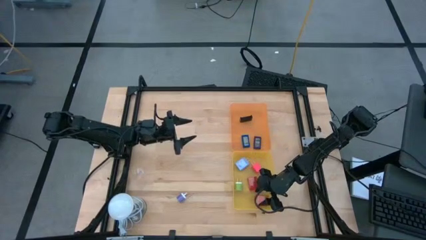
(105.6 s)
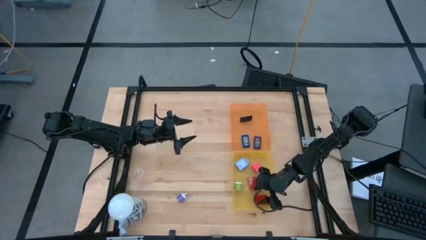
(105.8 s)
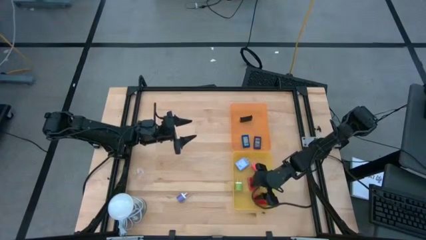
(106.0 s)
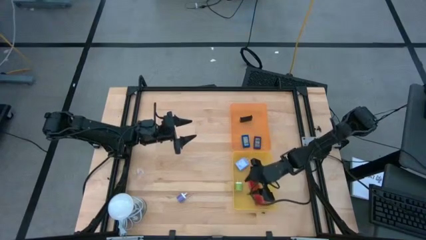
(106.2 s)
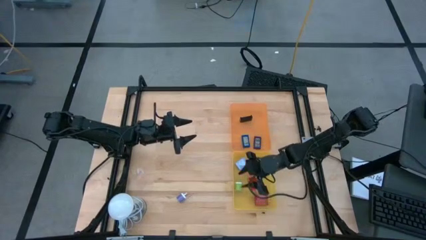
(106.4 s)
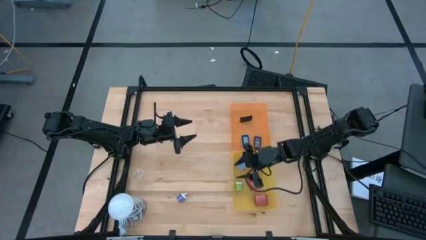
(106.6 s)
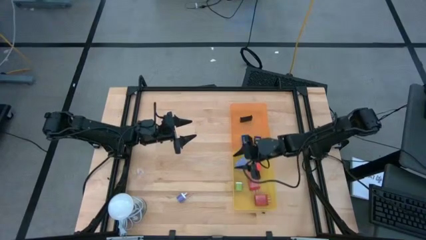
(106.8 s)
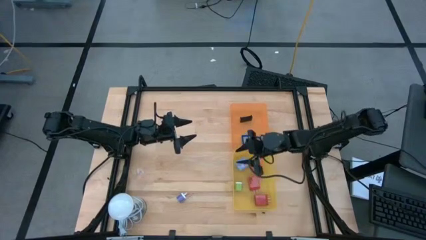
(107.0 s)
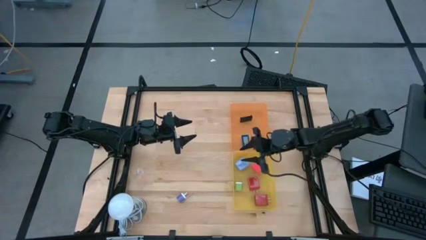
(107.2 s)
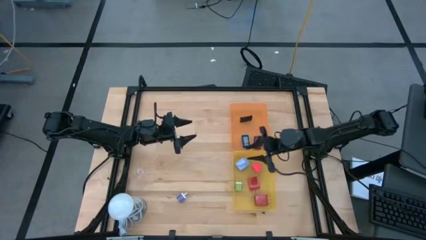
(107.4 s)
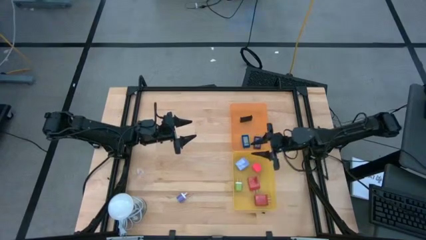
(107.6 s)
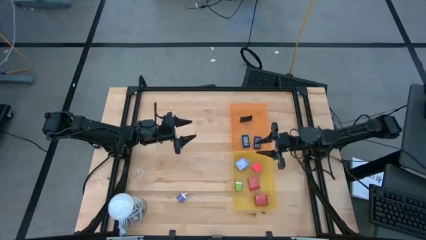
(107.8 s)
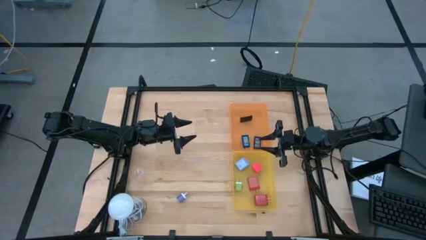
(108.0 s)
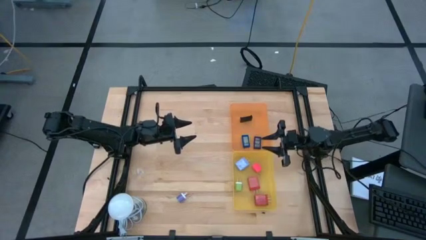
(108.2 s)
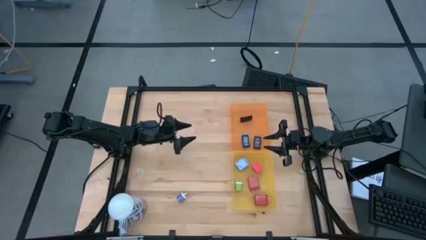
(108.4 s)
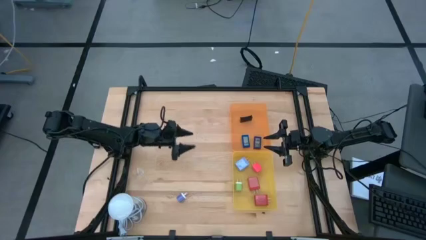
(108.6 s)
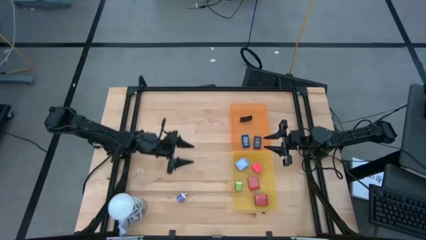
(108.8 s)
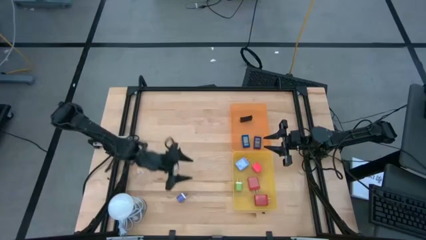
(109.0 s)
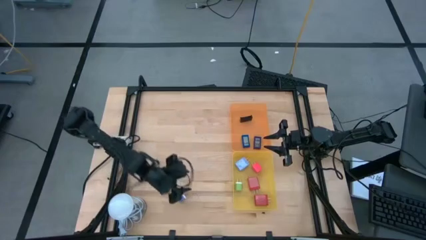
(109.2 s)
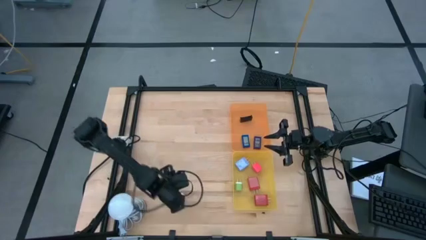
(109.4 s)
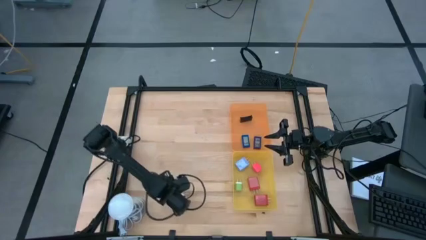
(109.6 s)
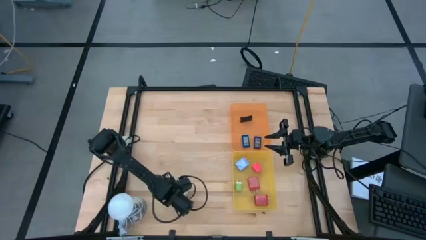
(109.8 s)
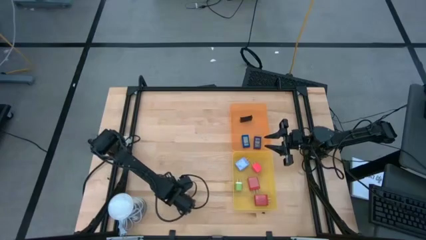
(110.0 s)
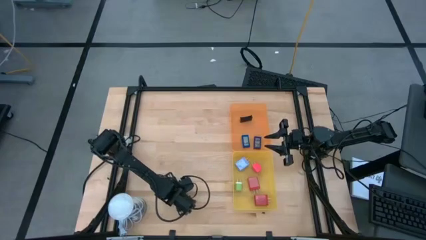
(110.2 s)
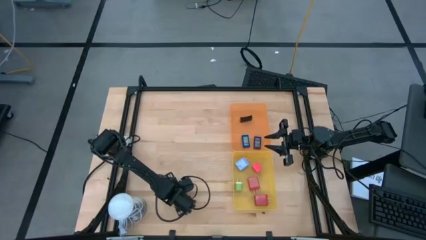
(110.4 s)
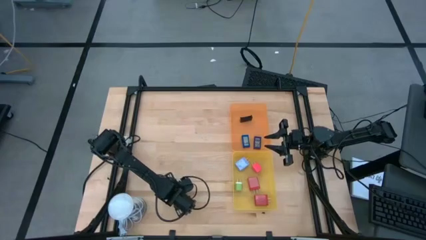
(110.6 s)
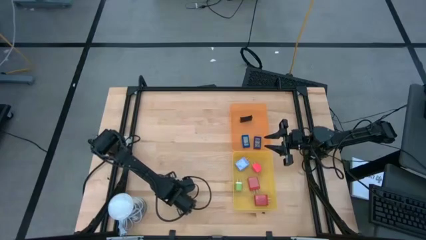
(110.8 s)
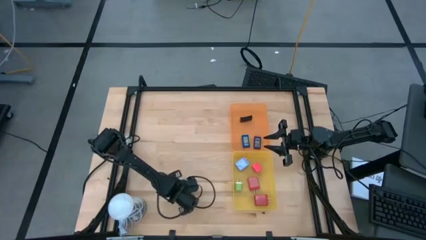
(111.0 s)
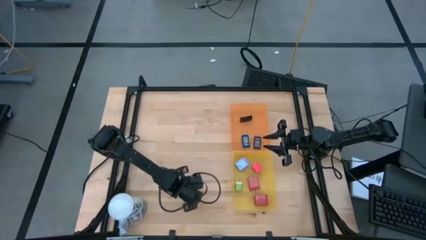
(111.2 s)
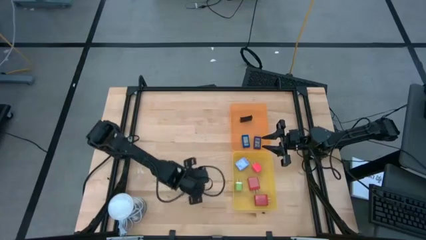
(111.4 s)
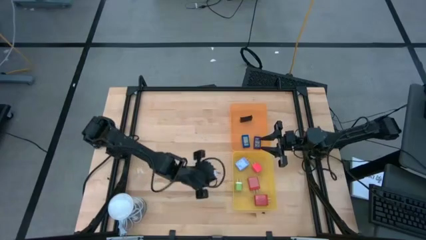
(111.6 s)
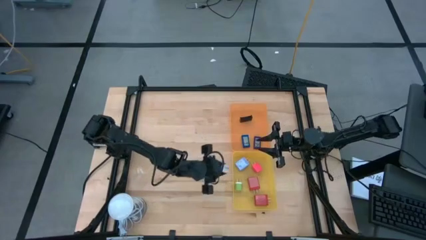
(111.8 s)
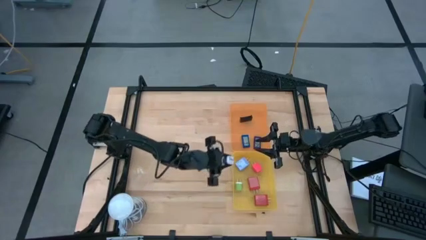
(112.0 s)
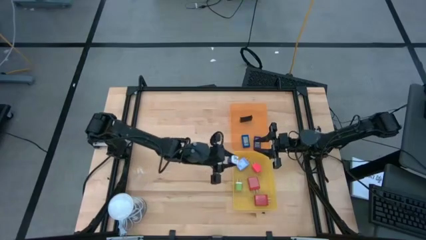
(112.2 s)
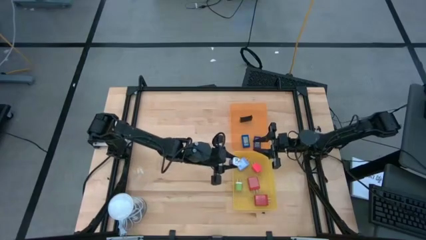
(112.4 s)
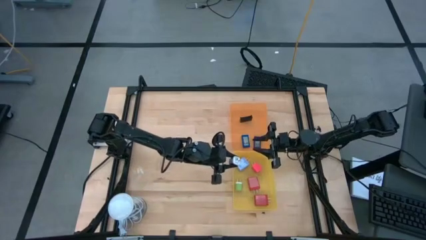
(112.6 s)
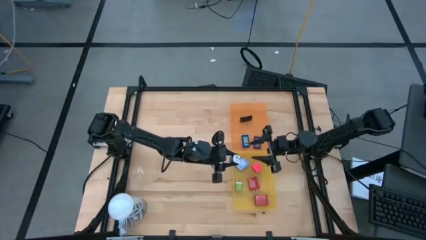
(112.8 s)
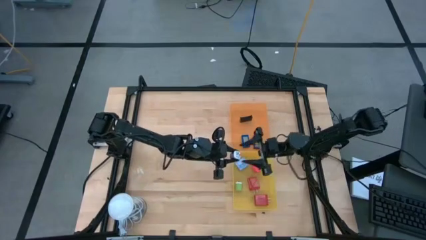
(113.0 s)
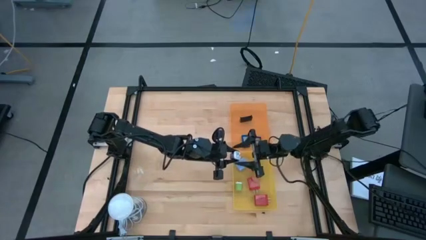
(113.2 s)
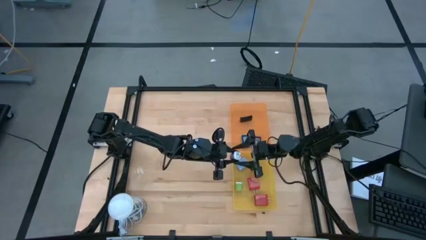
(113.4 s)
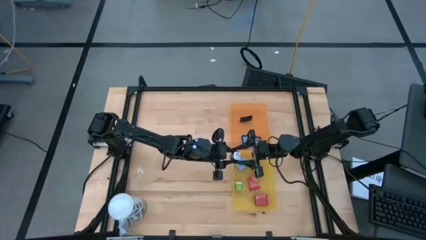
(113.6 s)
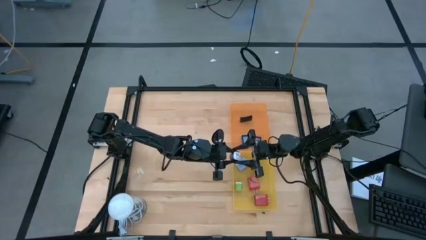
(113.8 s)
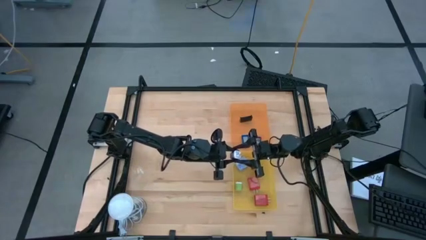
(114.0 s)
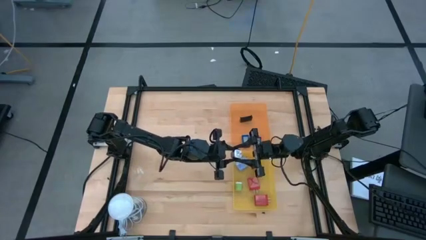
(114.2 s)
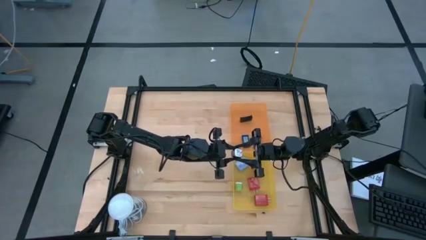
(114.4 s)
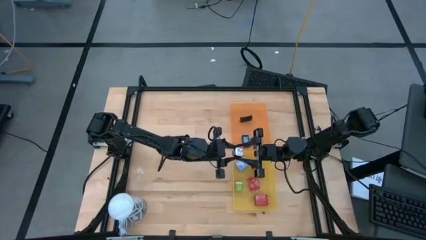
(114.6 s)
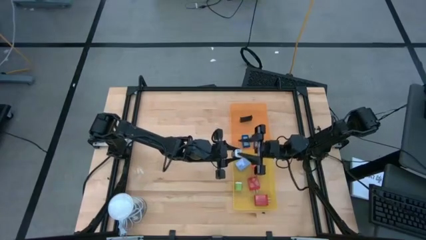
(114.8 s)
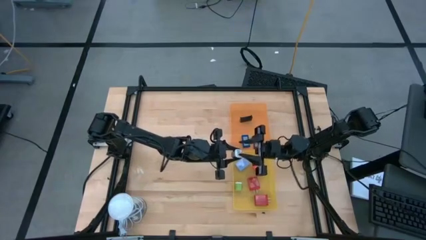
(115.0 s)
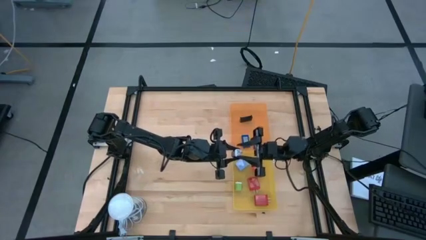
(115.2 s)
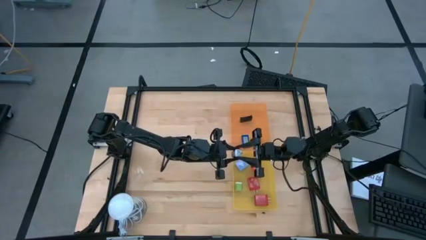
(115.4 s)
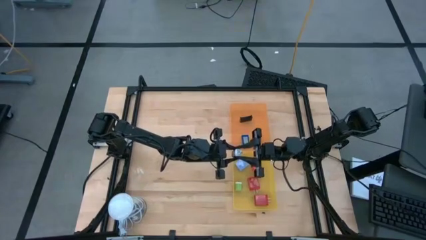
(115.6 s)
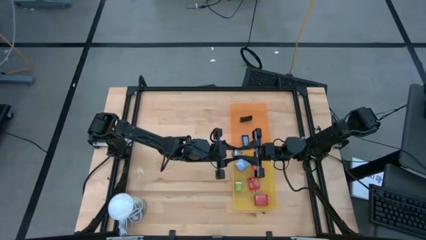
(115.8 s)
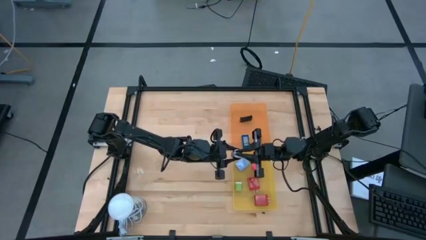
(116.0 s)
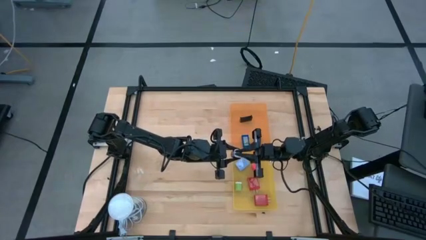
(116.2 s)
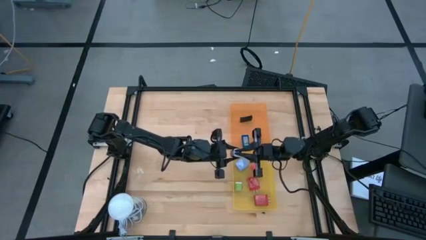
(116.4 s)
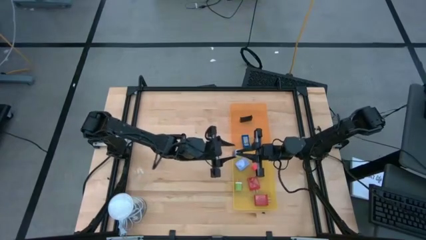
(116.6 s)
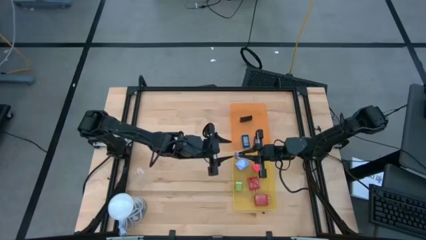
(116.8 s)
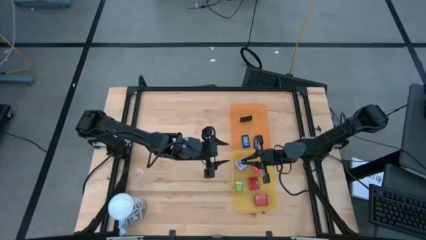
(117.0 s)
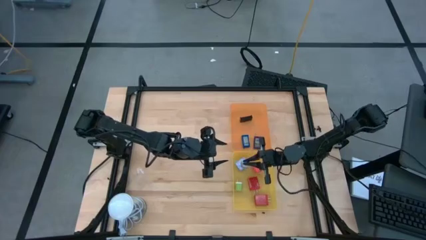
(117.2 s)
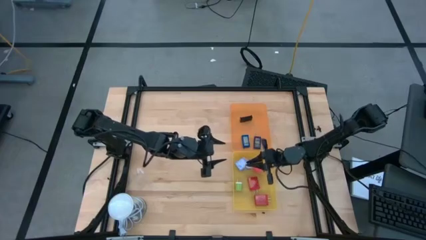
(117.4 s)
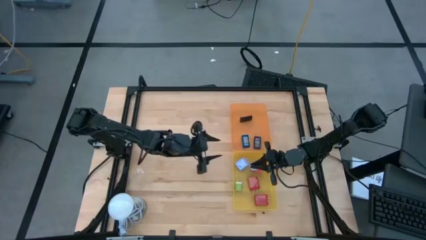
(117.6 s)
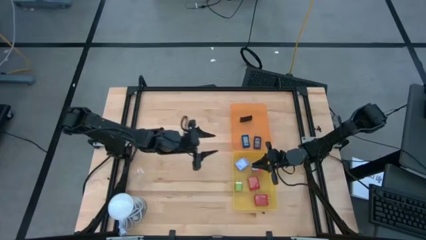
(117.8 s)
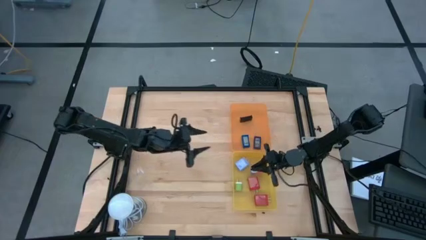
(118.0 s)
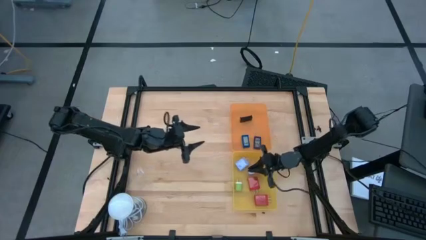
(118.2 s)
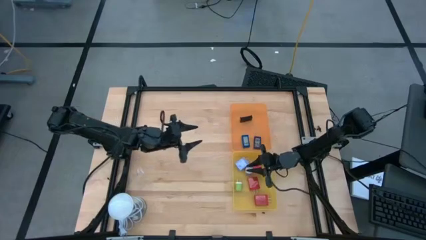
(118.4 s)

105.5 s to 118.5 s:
Task: Pick & Place Office items
Put the purple charger adapter into the yellow bin
